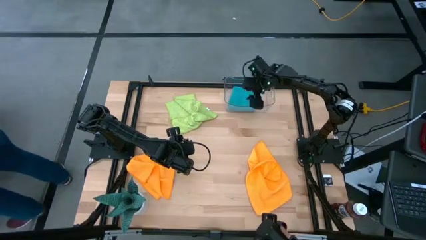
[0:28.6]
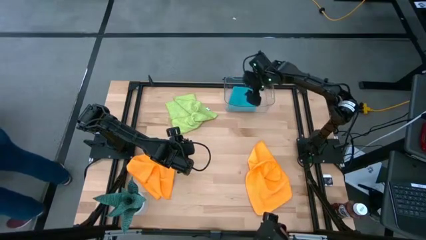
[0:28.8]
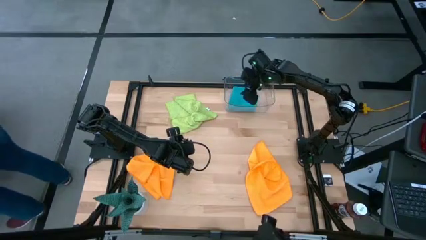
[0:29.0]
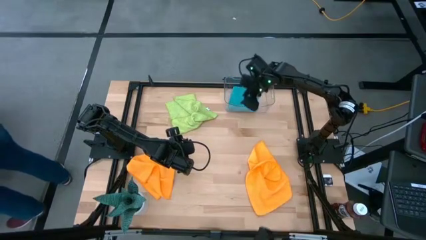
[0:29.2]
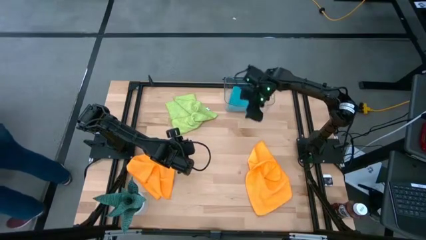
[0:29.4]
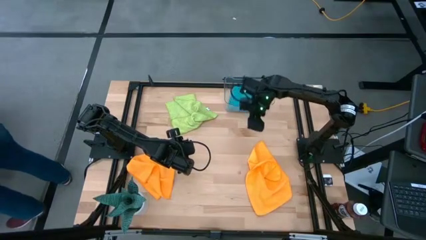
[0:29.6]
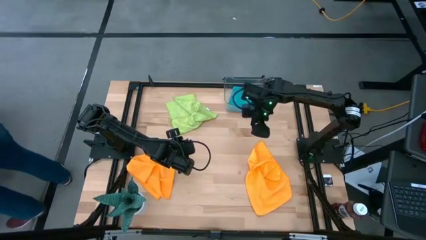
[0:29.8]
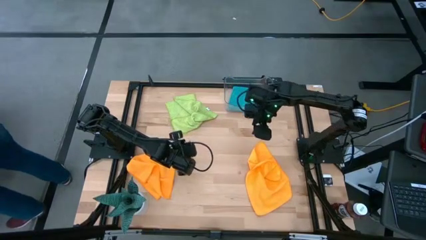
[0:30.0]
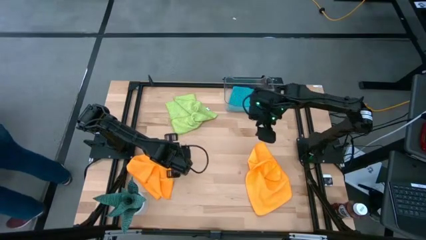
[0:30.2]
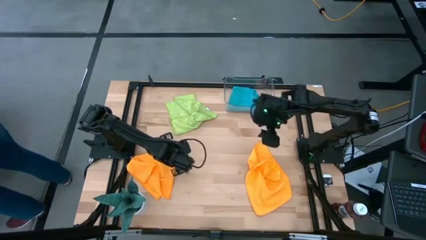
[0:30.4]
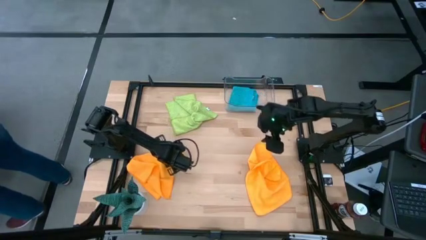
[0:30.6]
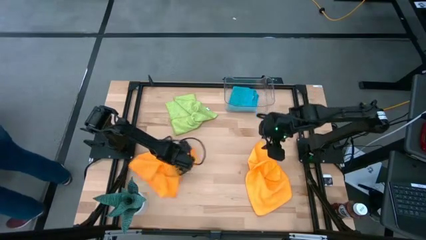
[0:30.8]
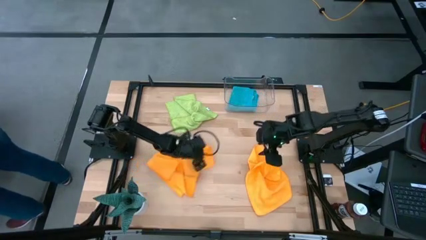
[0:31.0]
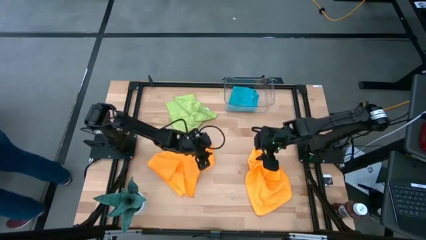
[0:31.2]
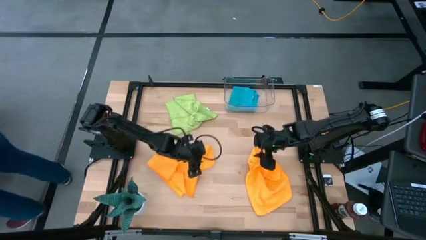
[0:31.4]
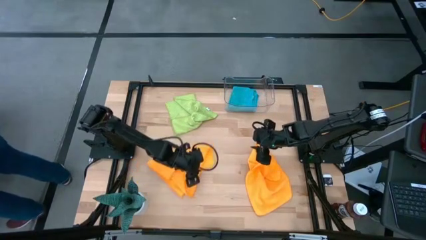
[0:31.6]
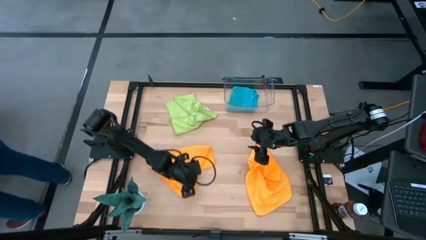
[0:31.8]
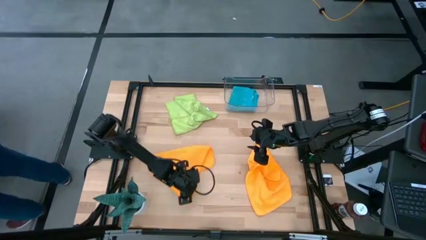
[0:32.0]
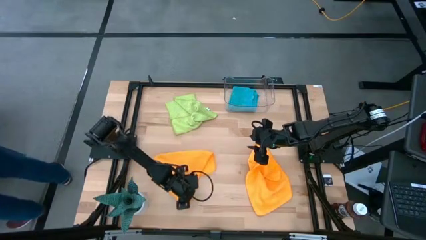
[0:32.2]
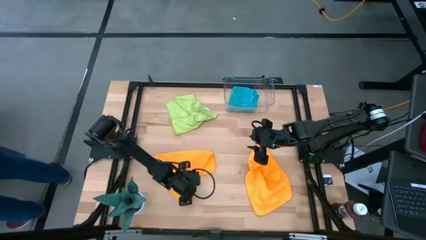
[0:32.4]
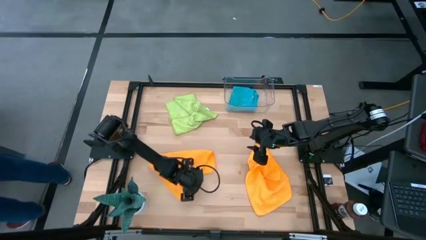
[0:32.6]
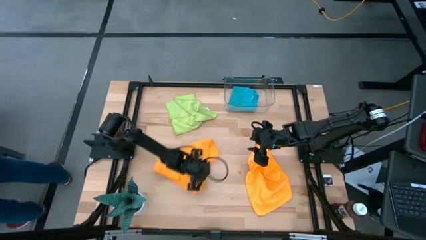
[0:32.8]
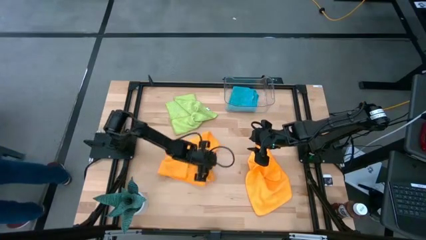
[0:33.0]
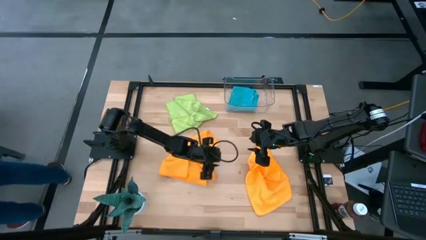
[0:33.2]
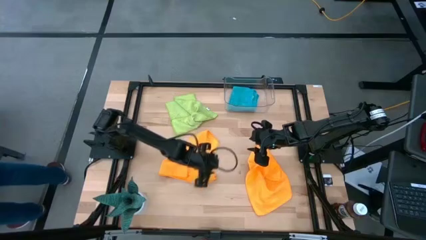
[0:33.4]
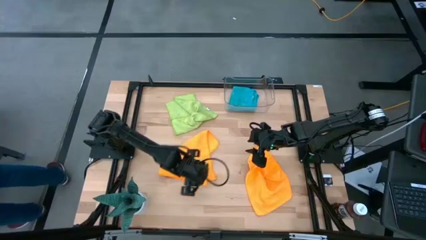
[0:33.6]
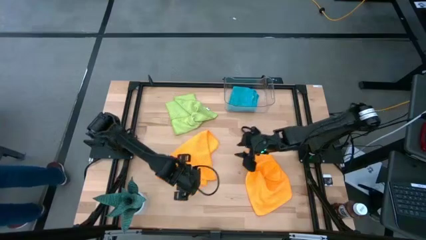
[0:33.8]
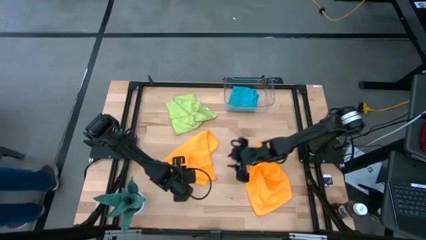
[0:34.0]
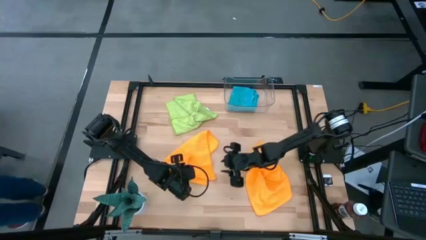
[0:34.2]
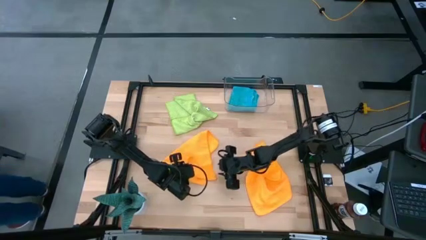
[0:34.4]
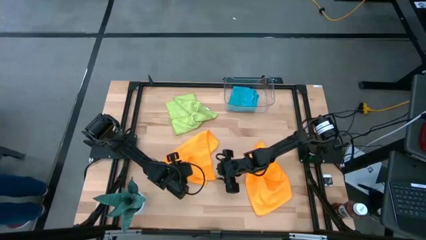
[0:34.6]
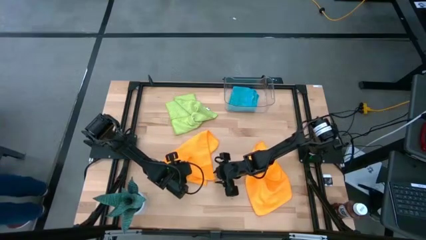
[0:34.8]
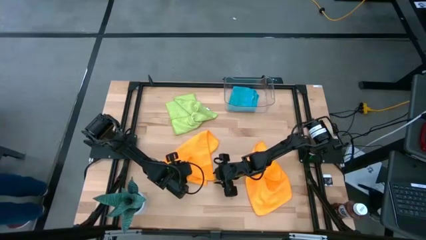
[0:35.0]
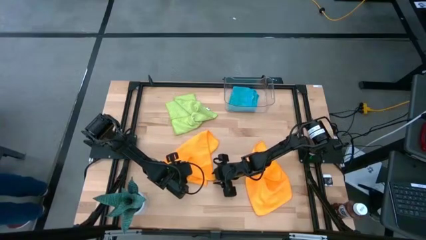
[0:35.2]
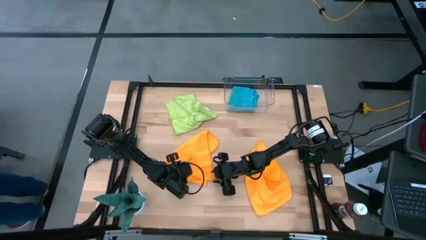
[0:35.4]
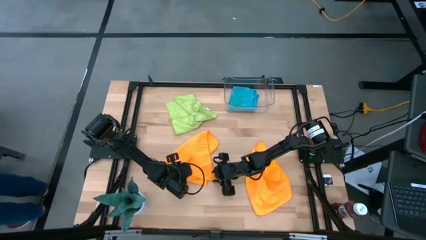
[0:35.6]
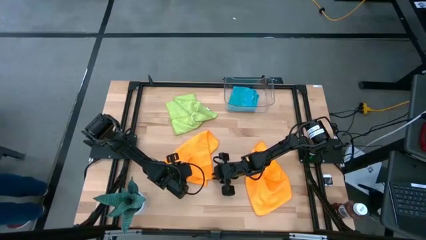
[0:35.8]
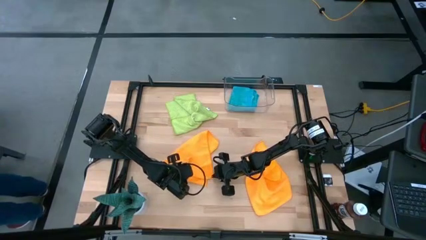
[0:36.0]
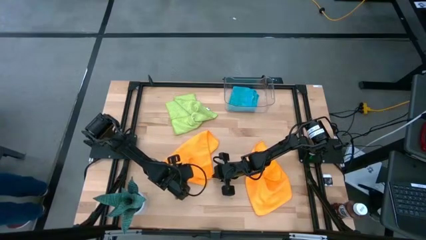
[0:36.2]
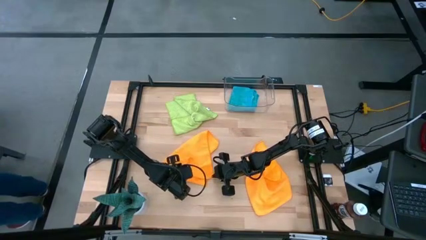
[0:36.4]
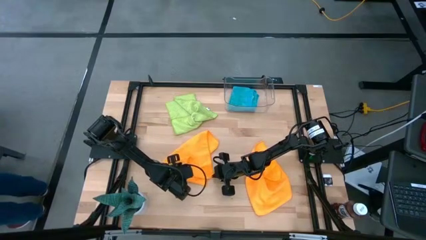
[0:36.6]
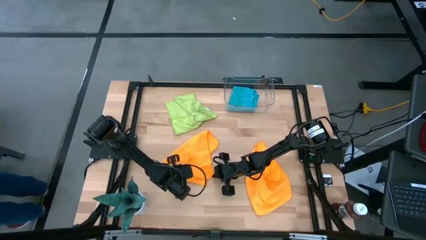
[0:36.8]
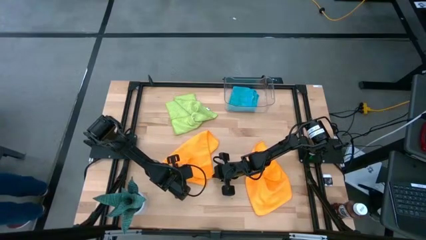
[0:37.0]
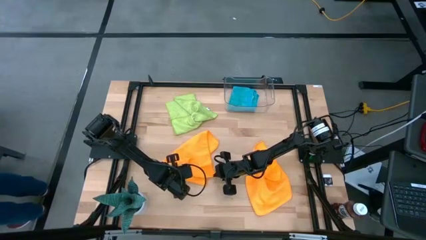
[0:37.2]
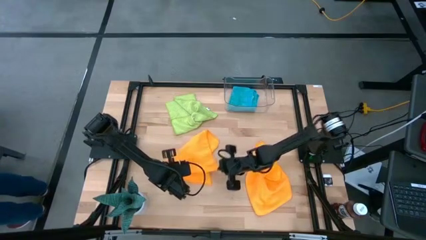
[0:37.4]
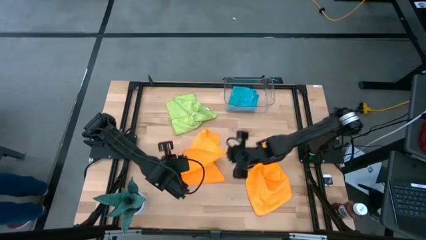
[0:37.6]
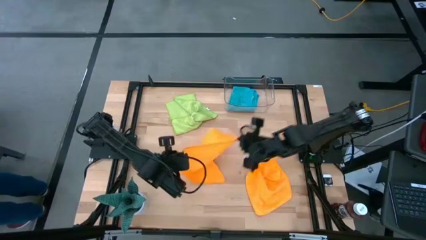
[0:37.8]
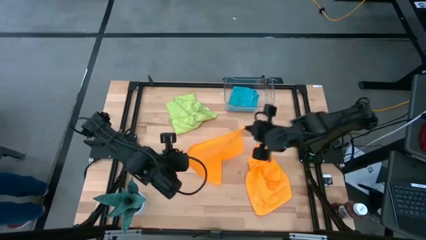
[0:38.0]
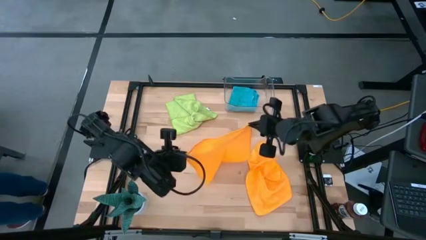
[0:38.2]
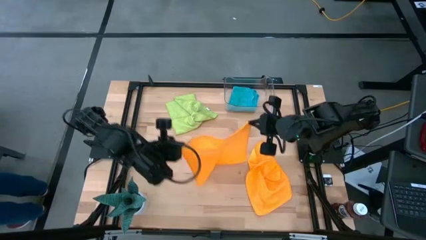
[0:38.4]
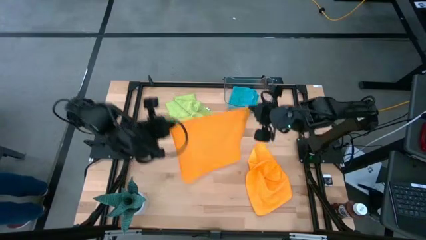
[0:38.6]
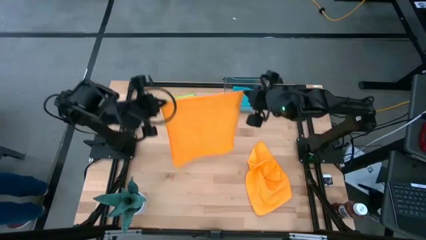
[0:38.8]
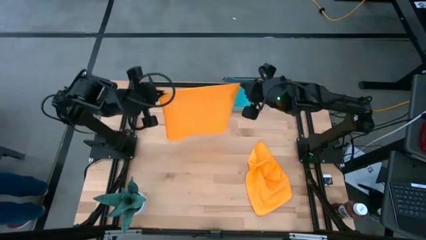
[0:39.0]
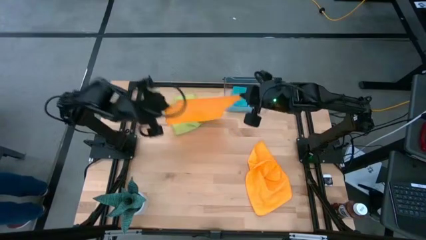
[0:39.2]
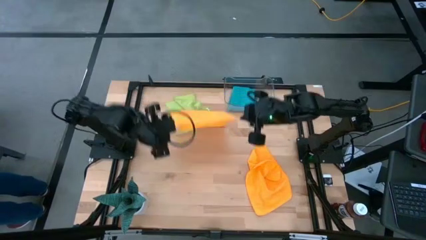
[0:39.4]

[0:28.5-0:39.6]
Task: Fold microfiber towels
Fold the left yellow microfiber cloth
